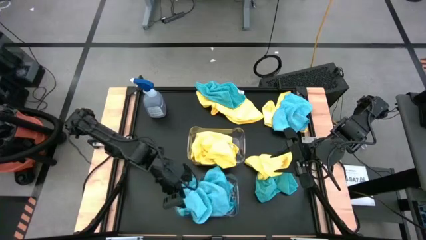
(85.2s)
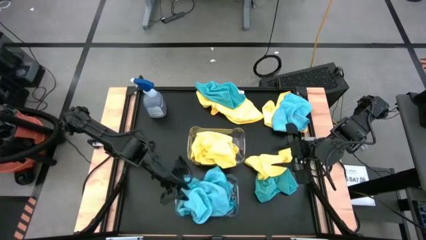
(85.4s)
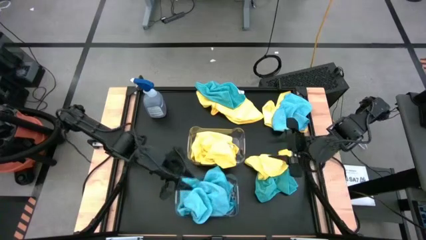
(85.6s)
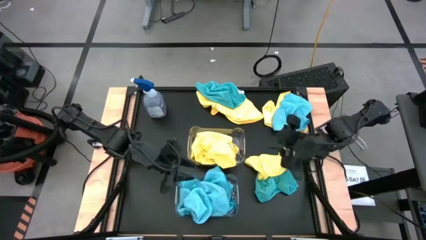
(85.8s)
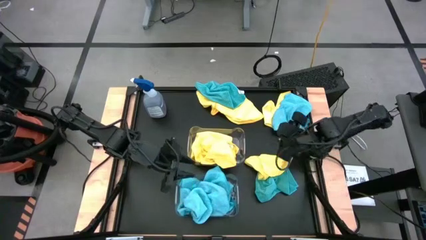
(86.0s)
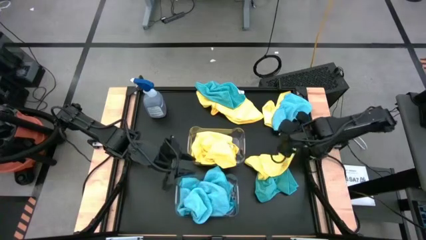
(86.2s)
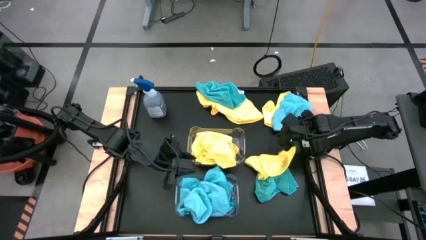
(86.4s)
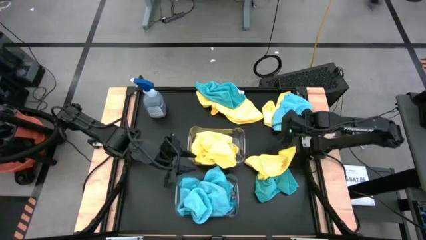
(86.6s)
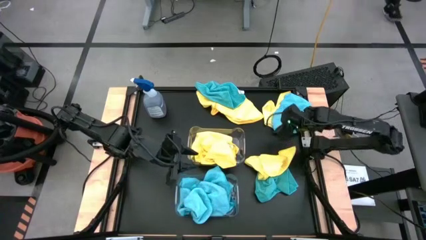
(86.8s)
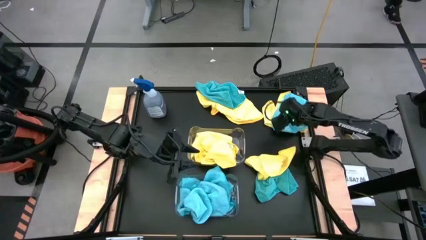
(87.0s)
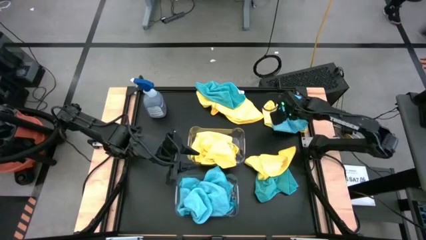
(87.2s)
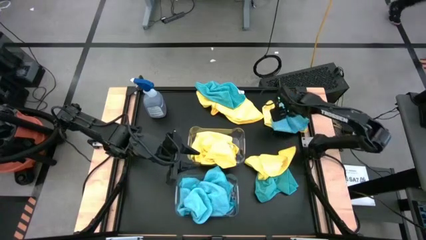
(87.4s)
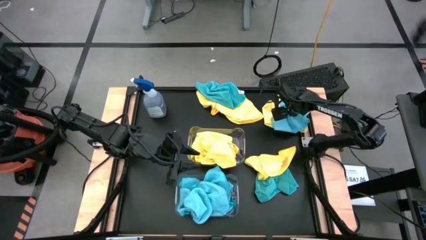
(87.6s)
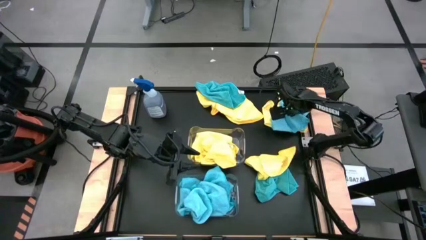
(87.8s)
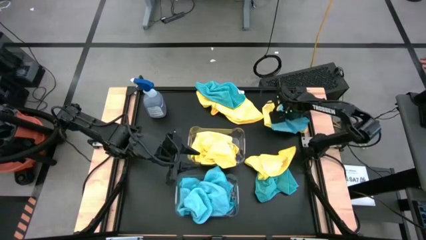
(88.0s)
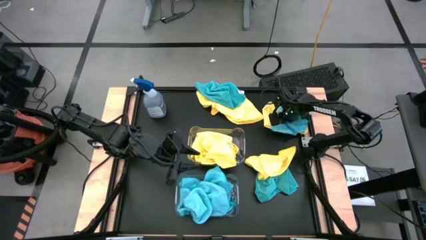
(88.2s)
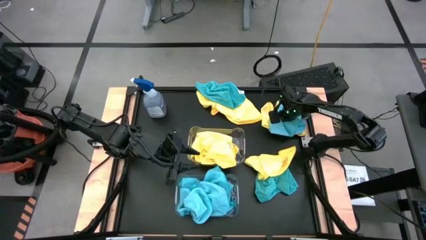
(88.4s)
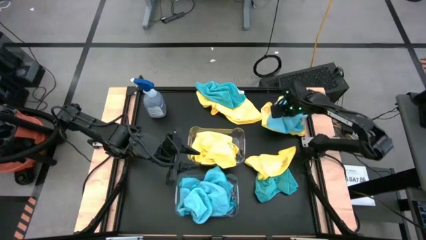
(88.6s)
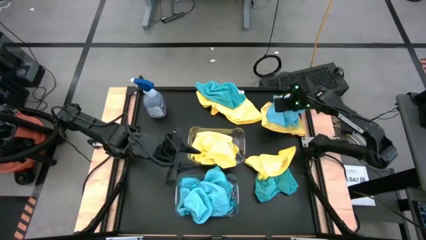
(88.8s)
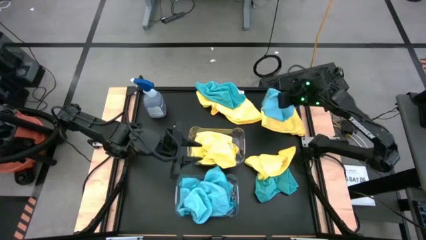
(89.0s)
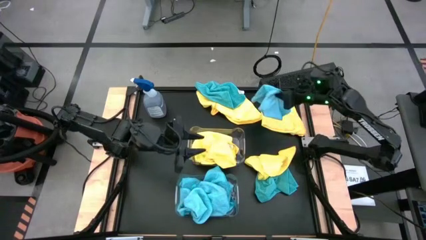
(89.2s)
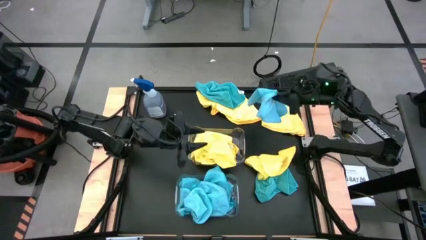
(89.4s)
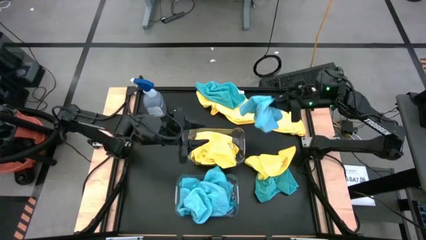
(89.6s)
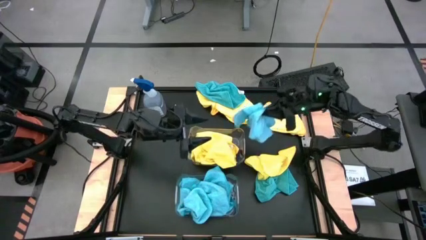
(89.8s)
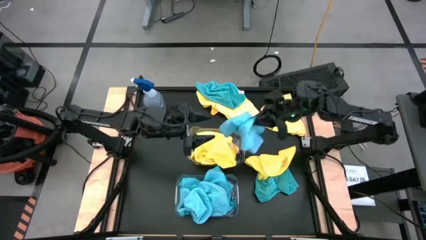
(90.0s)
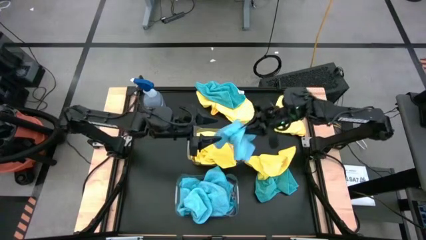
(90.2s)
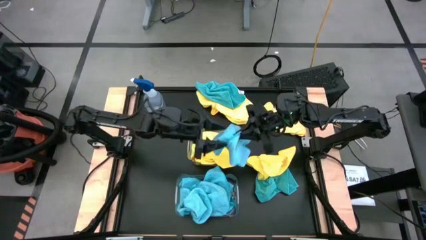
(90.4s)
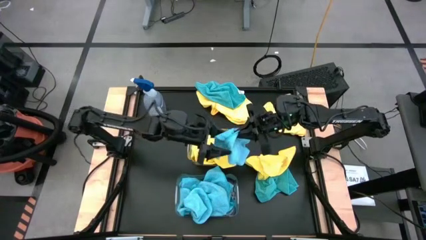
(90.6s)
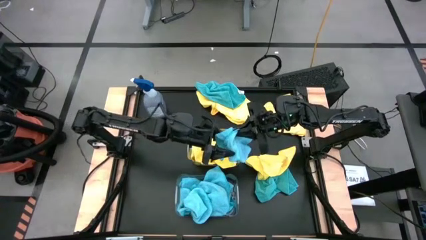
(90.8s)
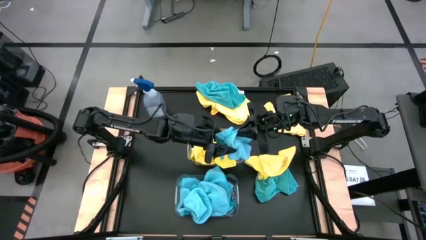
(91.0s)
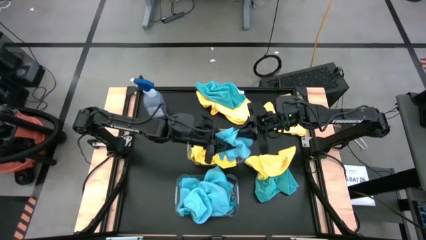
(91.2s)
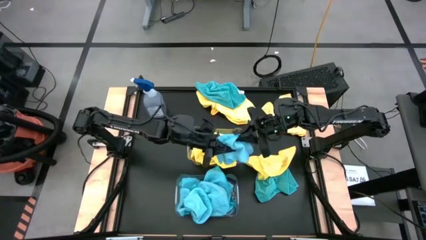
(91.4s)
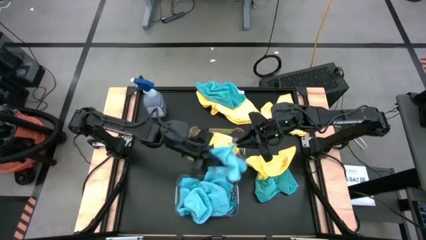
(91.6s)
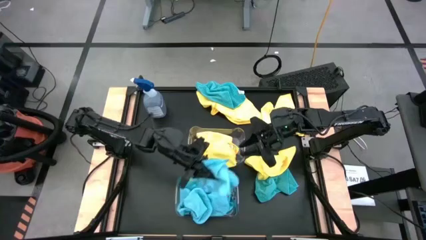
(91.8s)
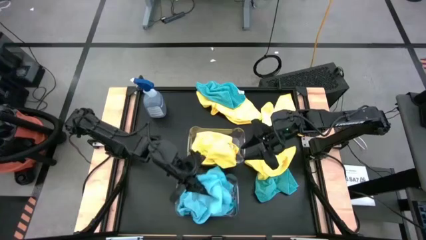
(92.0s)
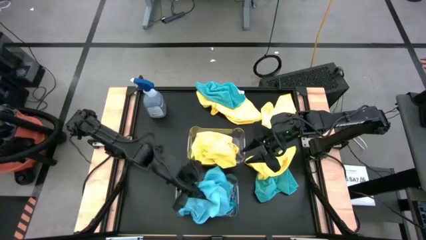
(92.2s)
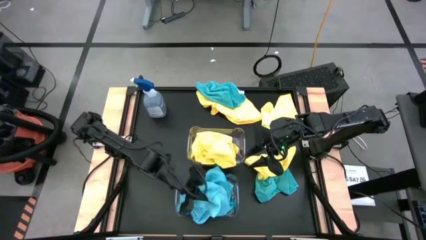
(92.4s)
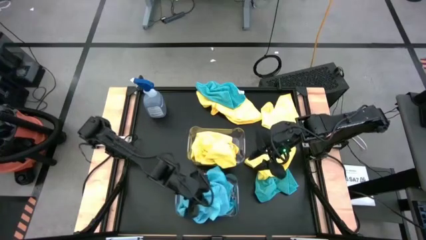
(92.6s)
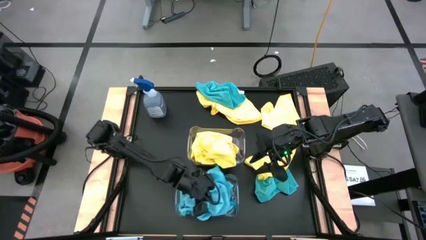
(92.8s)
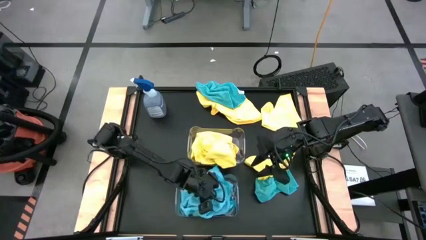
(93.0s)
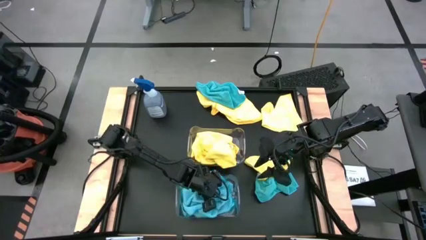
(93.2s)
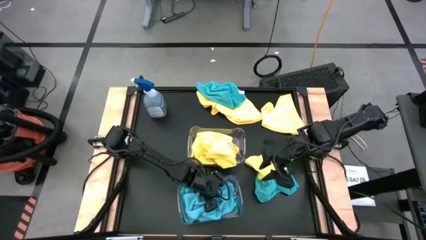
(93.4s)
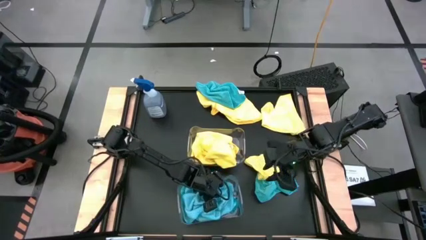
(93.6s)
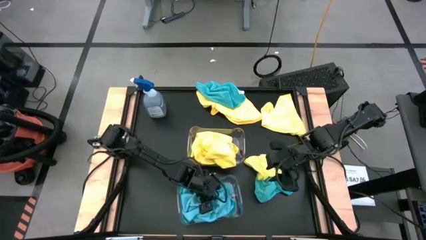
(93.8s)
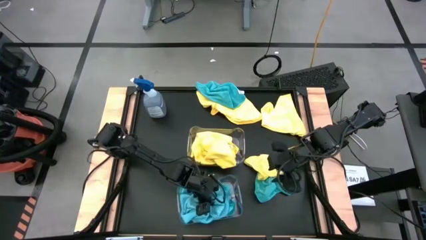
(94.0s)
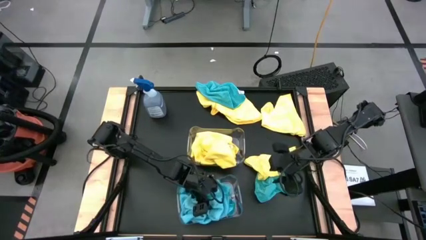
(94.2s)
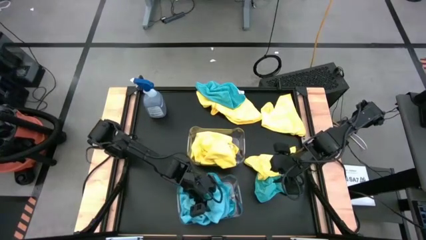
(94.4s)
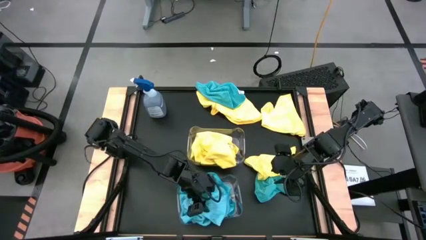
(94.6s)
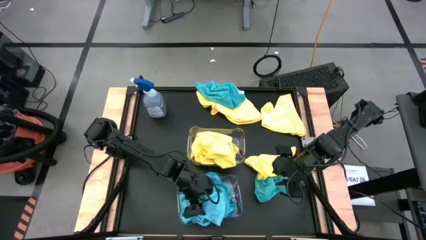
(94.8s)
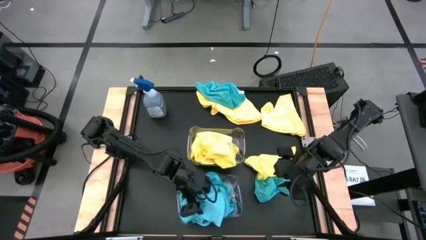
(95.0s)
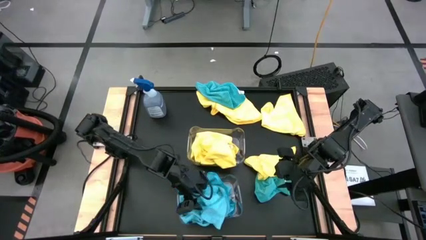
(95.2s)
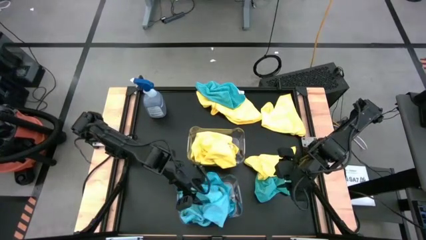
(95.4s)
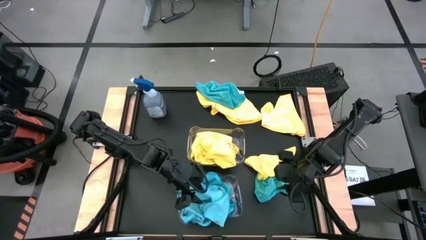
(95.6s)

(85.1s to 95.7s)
Task: Sort microfiber towel by color & place in baskets
Put the blue microfiber cloth into the bottom transparent bin

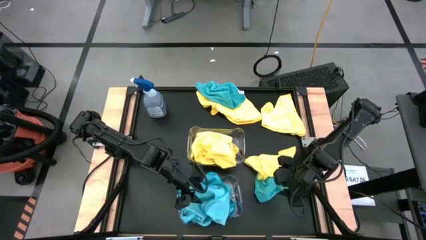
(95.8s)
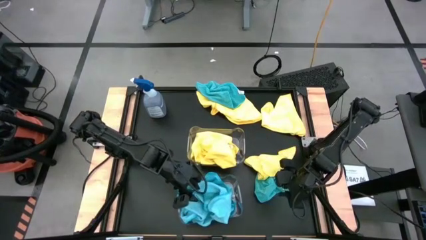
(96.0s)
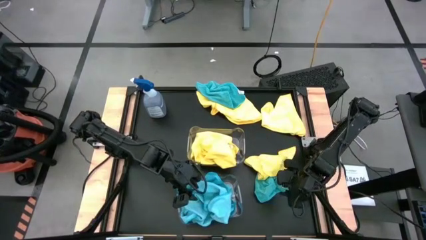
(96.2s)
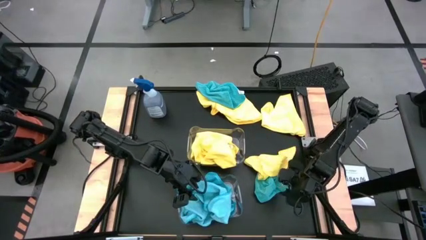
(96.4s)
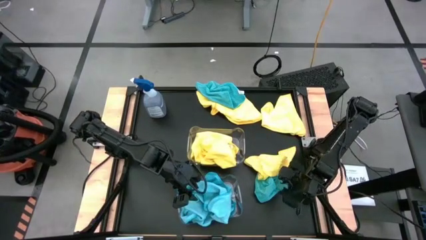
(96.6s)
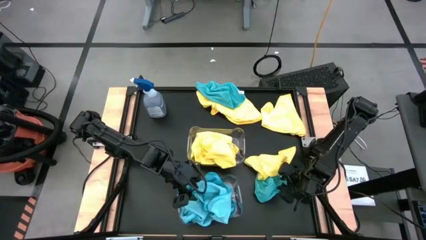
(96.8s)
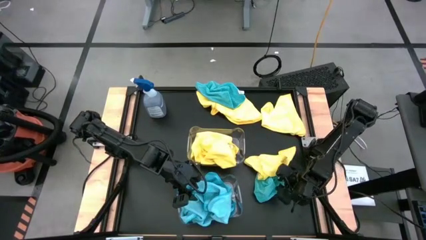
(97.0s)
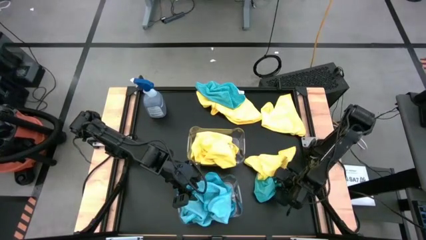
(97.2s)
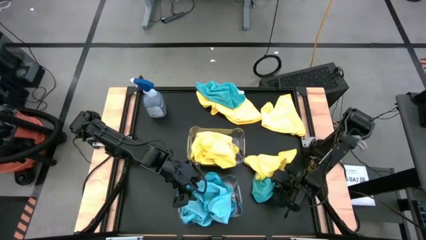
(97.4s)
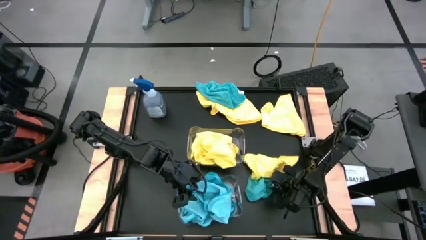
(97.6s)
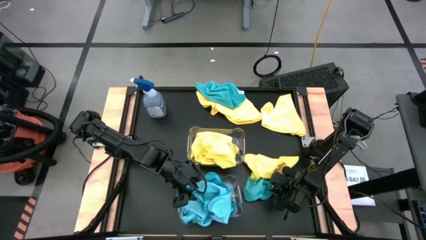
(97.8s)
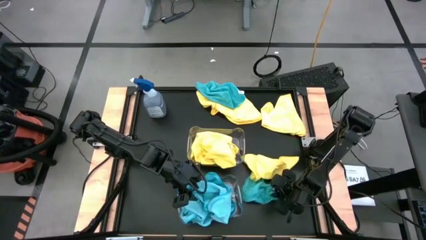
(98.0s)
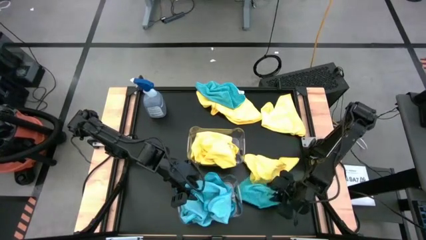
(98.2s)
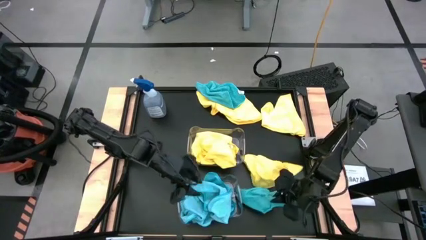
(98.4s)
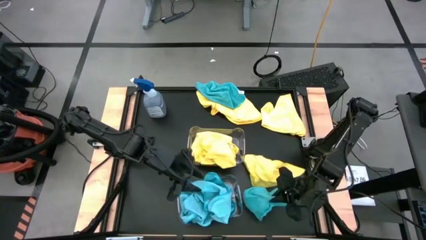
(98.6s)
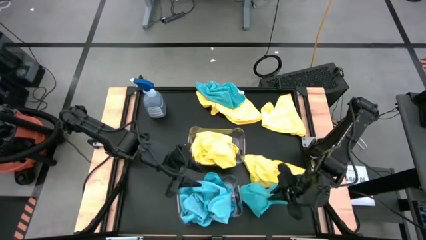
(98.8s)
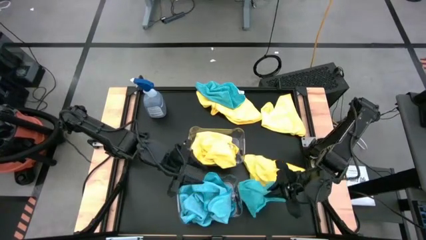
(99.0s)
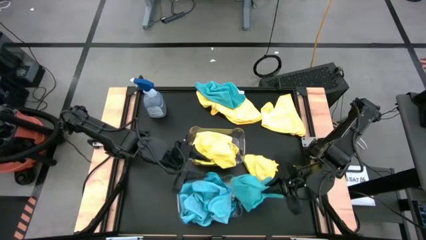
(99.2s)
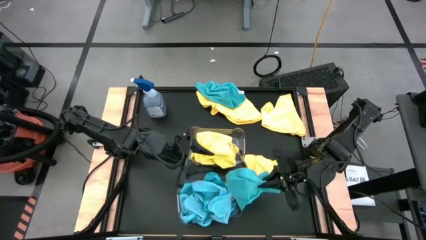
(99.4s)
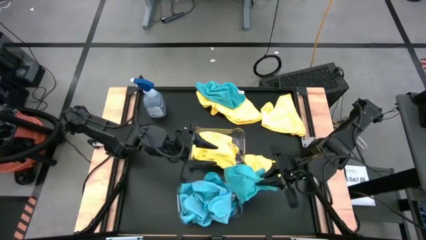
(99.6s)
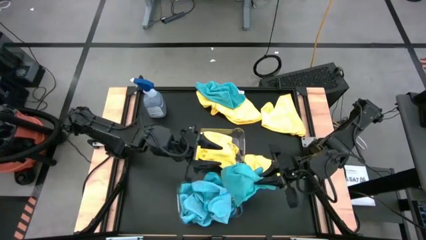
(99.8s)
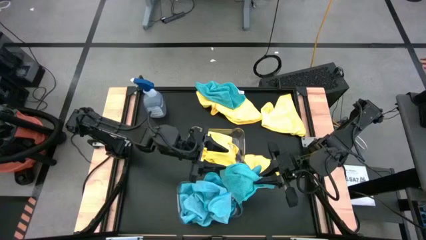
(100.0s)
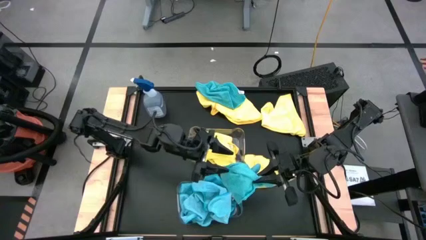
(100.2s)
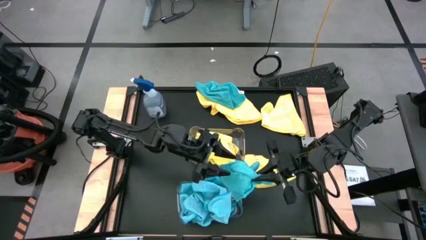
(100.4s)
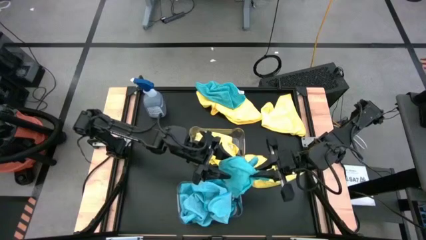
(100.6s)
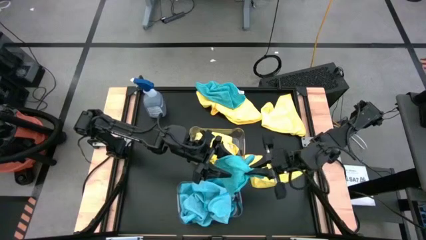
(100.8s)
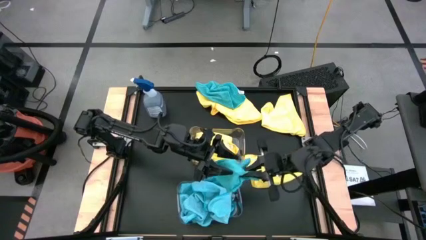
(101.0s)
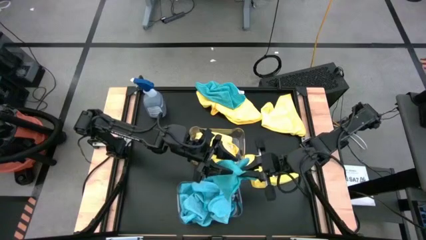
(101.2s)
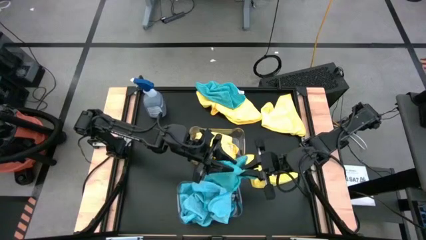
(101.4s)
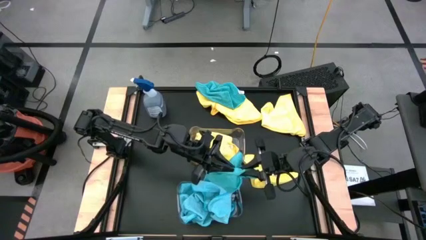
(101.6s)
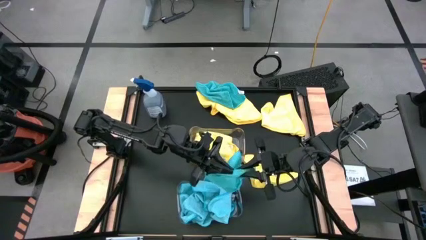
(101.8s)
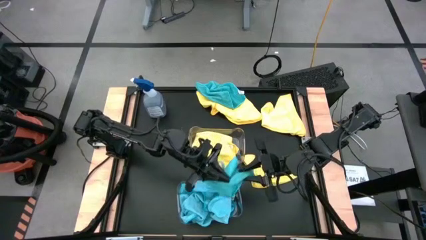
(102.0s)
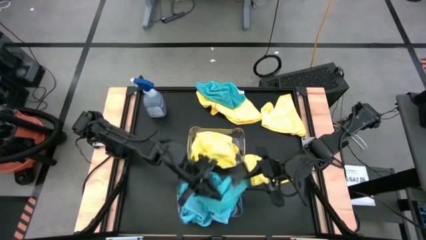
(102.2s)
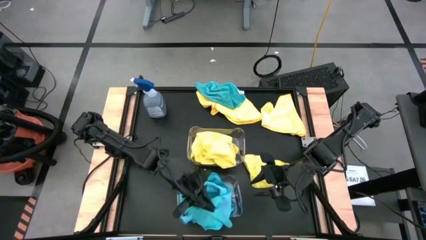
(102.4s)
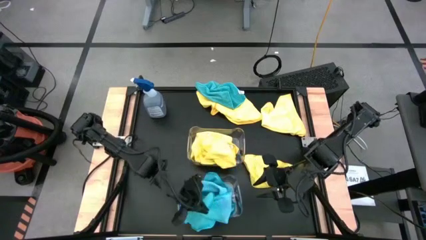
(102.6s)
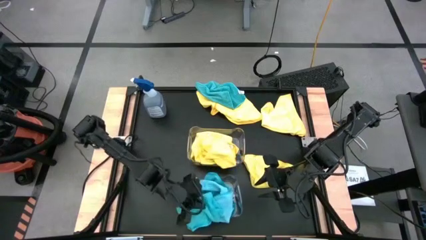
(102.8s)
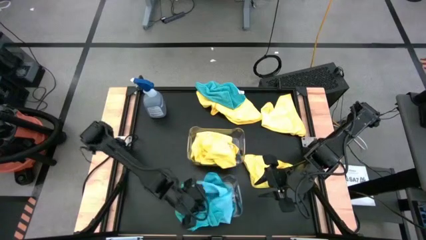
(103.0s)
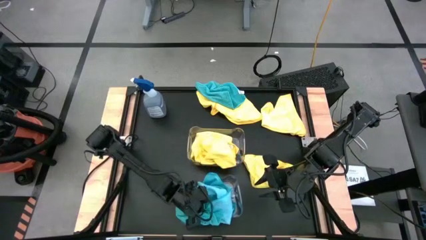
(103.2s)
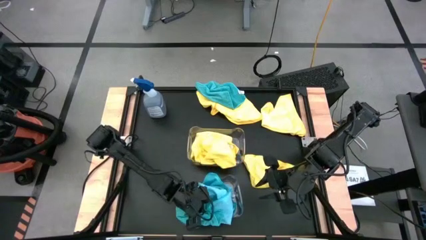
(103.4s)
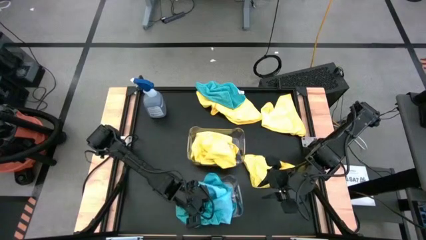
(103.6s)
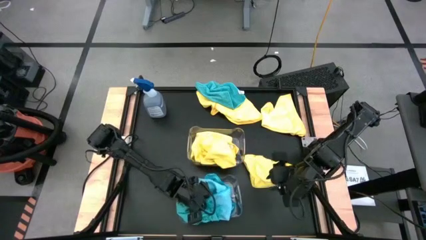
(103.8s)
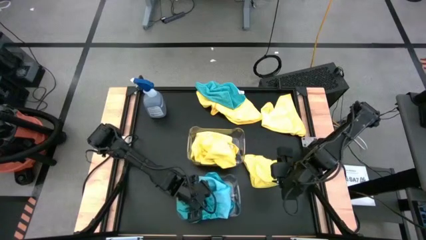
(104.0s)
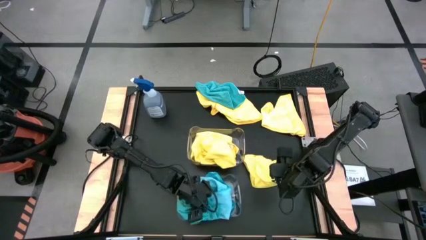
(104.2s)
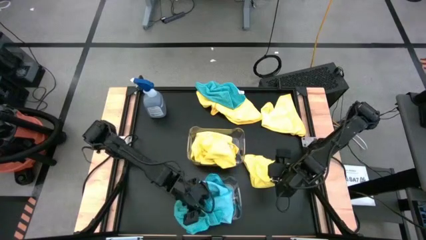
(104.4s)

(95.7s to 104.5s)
Put the blue microfiber cloth into the bottom transparent bin
